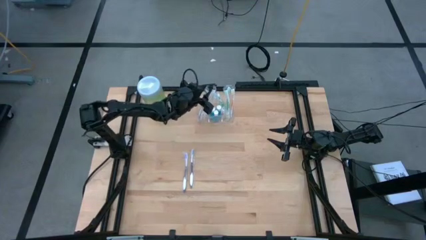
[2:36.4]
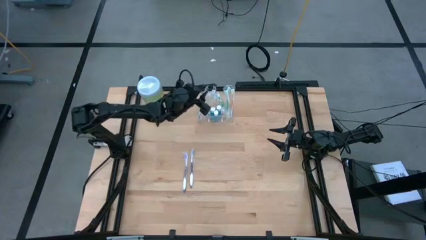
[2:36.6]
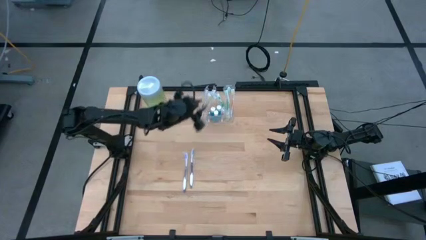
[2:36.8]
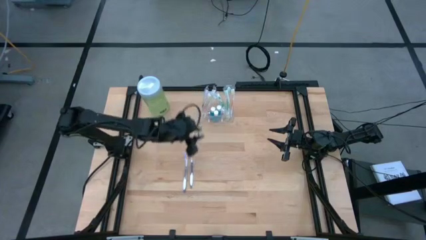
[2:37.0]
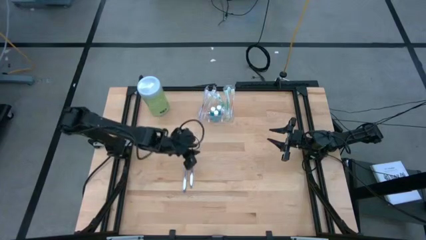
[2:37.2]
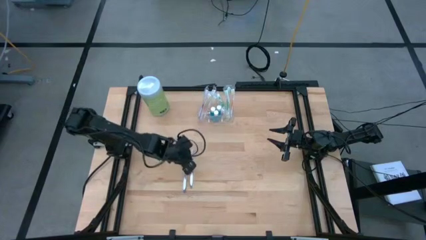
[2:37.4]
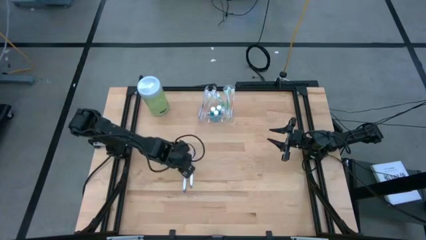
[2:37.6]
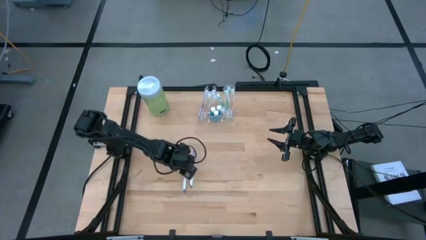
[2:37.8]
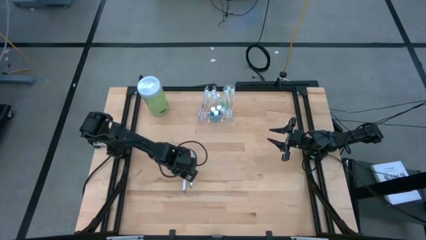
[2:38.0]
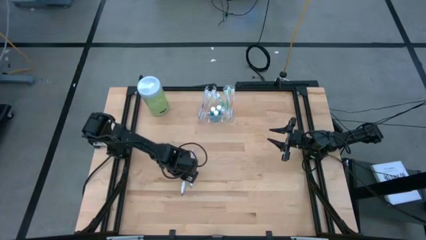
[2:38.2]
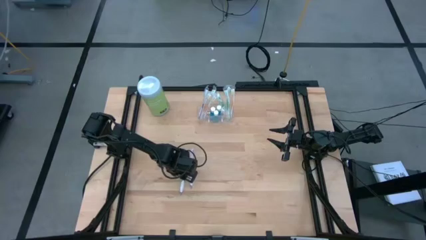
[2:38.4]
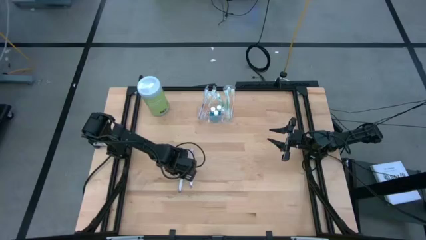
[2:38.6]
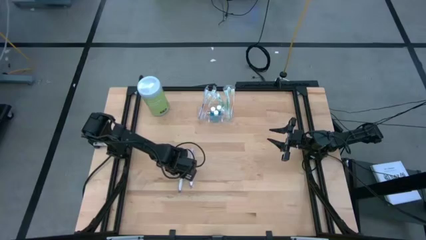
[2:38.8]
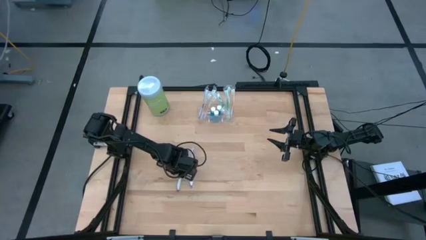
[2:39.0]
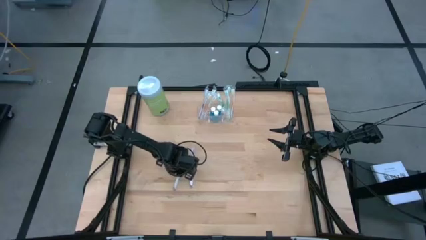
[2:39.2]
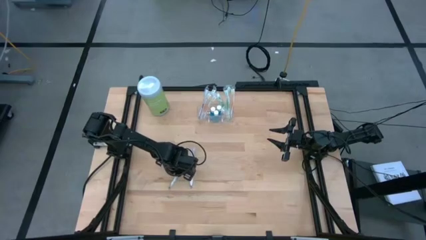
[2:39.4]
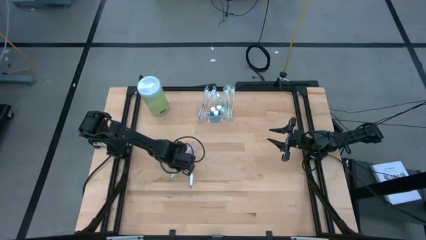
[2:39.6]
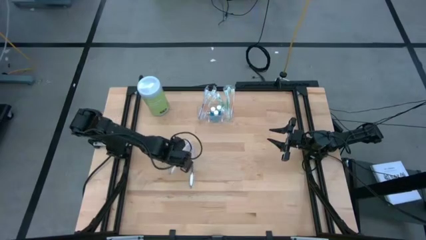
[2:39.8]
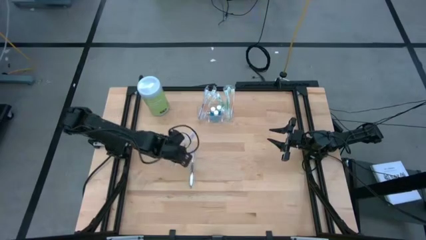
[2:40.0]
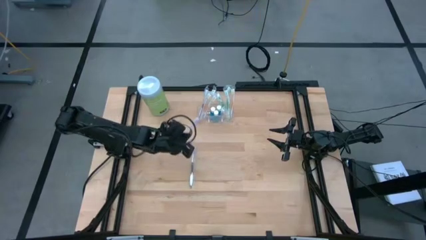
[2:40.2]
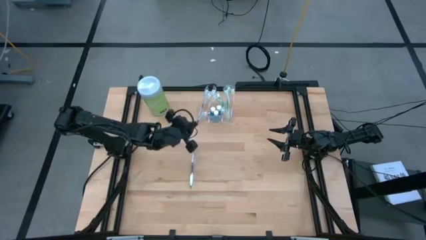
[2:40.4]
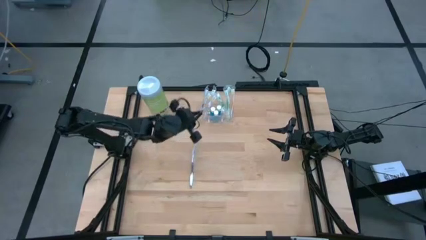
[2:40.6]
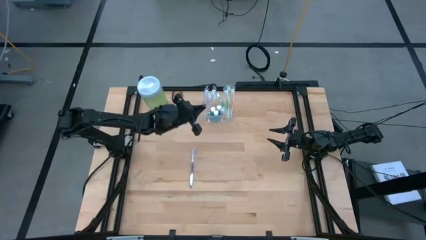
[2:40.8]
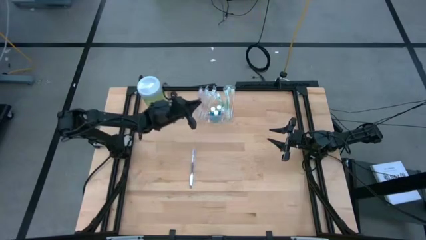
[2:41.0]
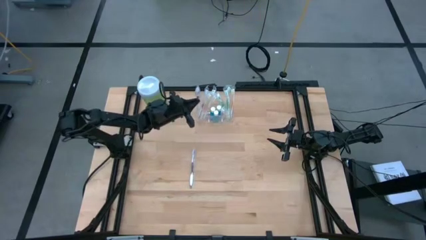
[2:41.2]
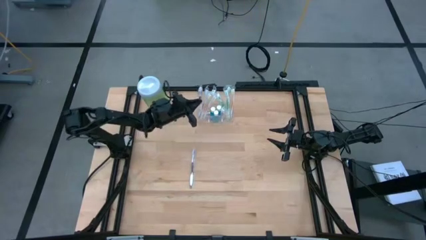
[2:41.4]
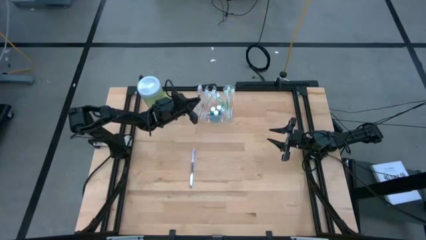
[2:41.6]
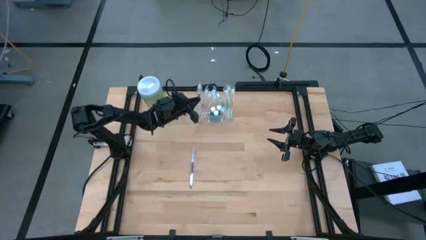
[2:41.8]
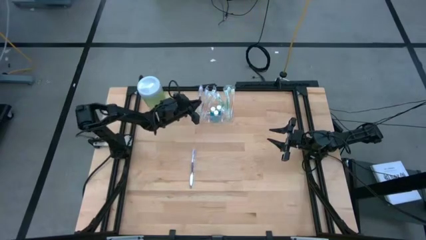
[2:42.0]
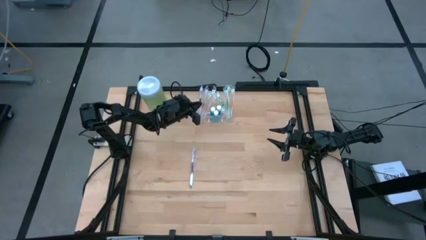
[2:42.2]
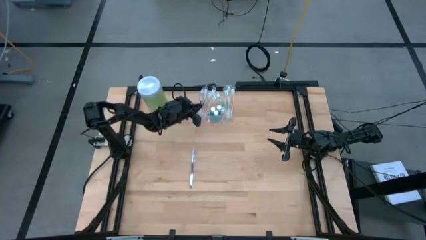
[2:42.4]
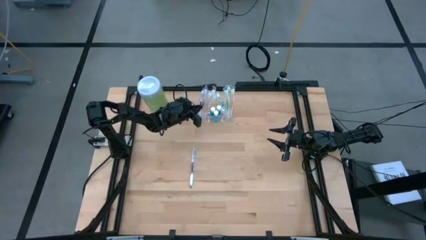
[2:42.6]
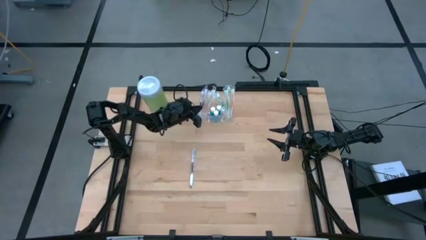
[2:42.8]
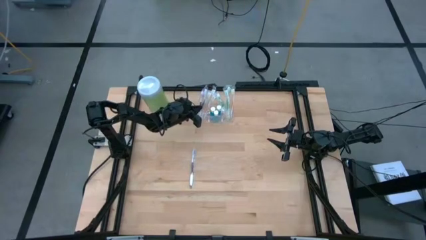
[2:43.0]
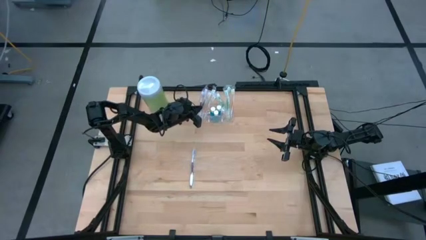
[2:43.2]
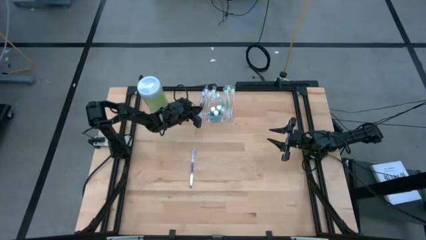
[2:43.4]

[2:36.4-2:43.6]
Task: Pick & Place toothbrushing station
Put the purple toothbrush into the transparent organizer

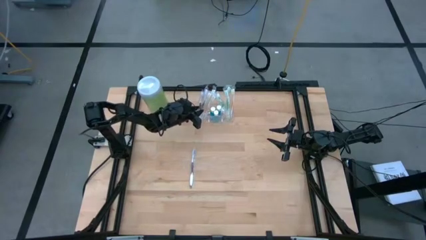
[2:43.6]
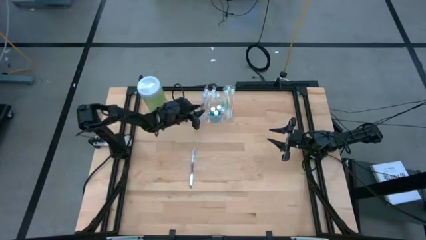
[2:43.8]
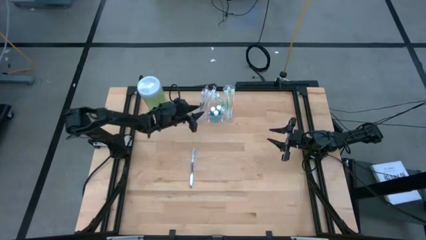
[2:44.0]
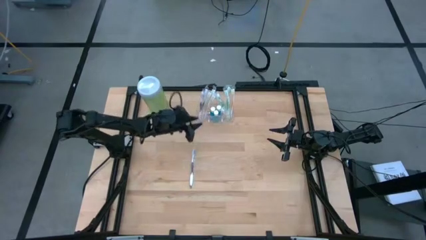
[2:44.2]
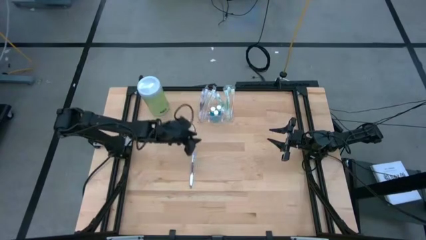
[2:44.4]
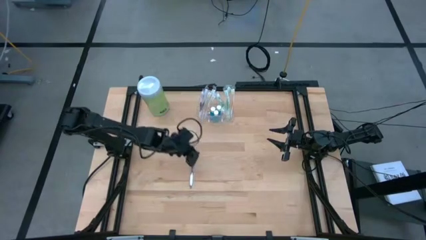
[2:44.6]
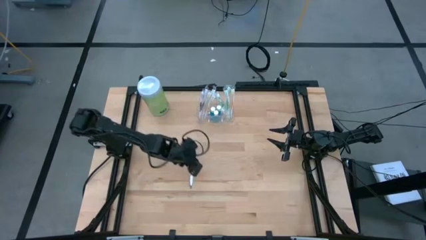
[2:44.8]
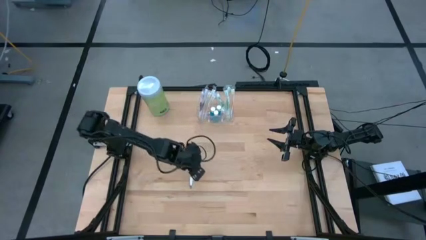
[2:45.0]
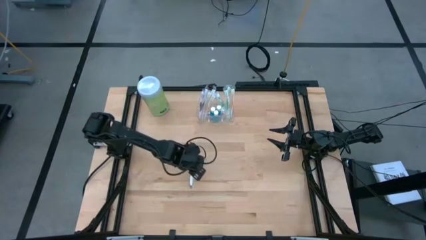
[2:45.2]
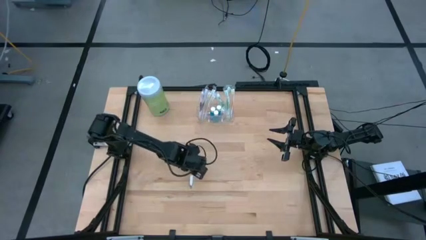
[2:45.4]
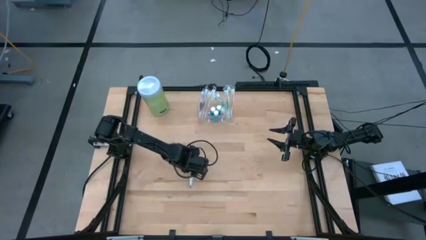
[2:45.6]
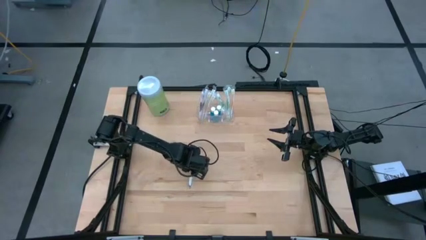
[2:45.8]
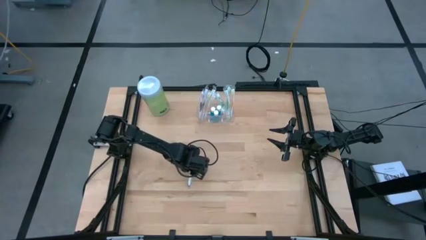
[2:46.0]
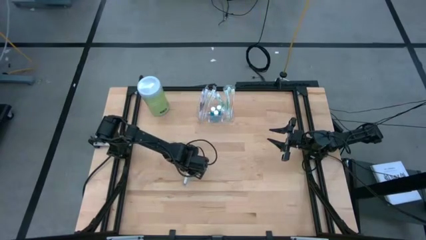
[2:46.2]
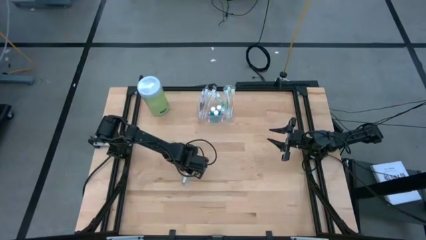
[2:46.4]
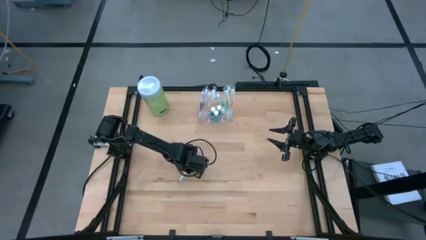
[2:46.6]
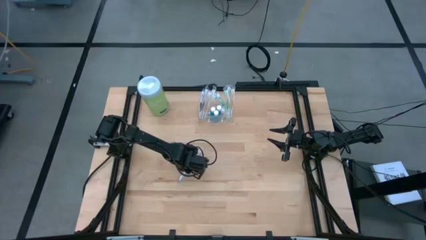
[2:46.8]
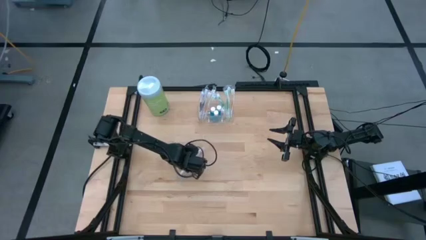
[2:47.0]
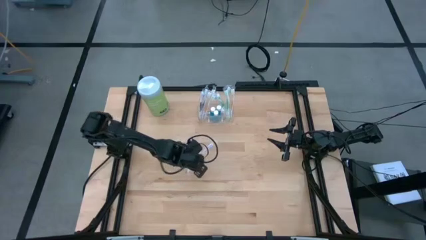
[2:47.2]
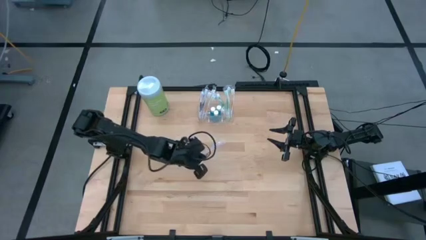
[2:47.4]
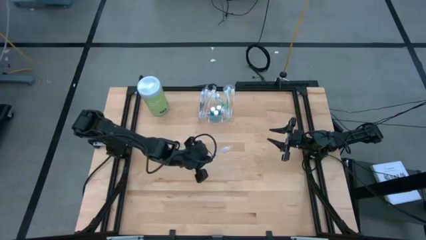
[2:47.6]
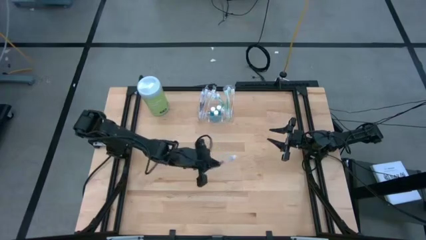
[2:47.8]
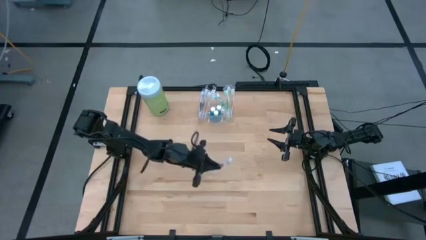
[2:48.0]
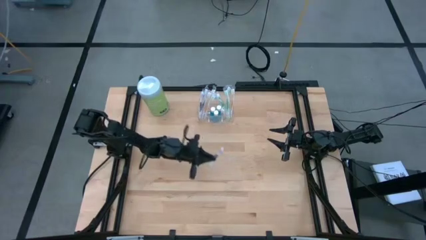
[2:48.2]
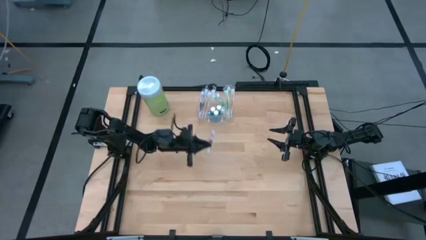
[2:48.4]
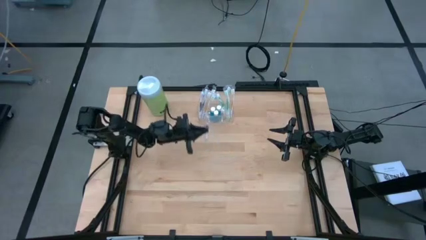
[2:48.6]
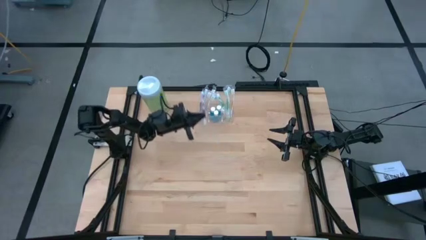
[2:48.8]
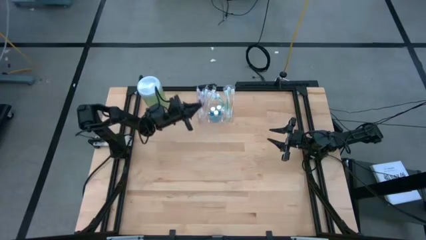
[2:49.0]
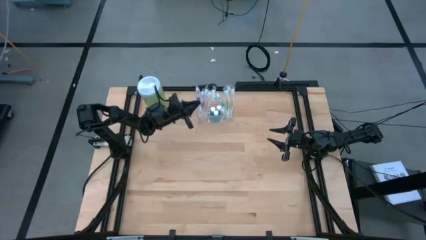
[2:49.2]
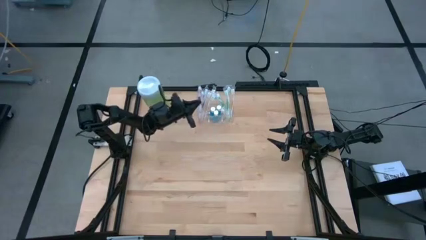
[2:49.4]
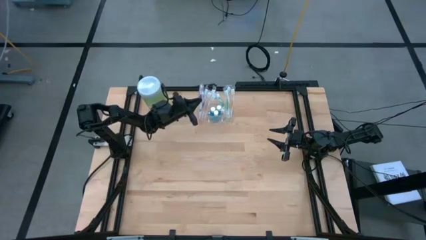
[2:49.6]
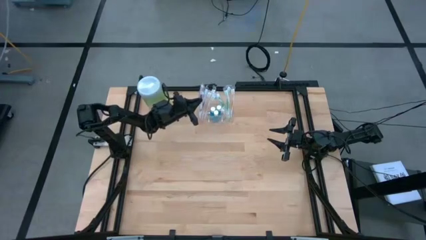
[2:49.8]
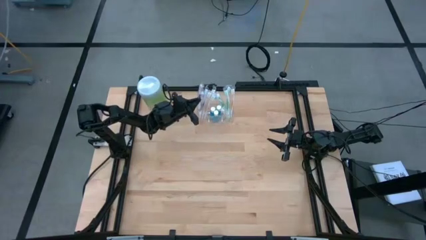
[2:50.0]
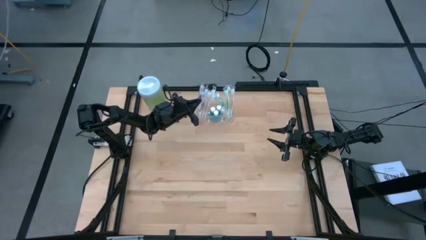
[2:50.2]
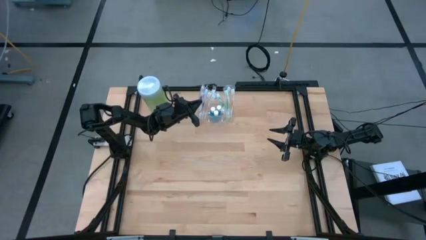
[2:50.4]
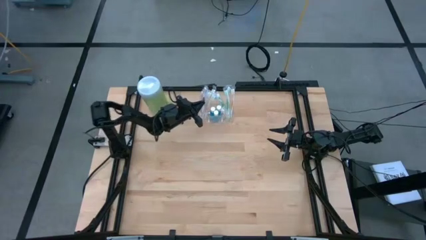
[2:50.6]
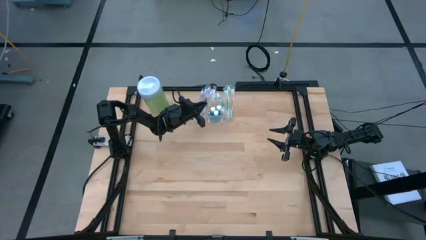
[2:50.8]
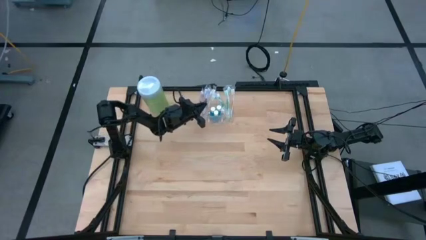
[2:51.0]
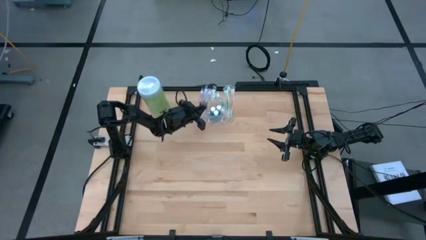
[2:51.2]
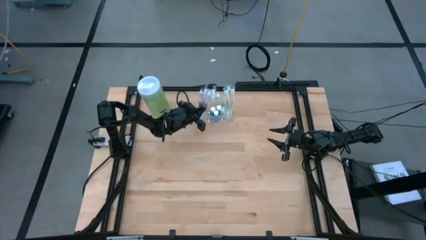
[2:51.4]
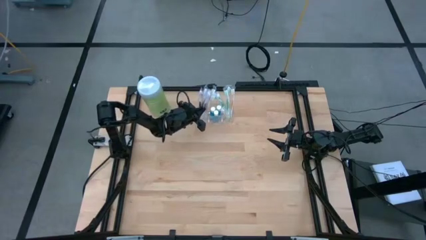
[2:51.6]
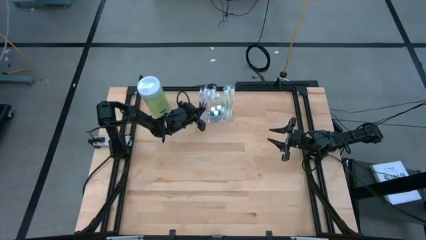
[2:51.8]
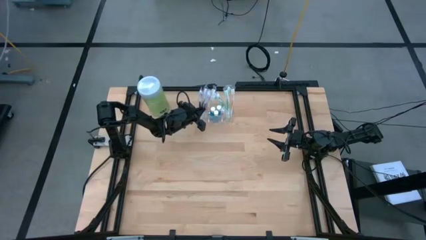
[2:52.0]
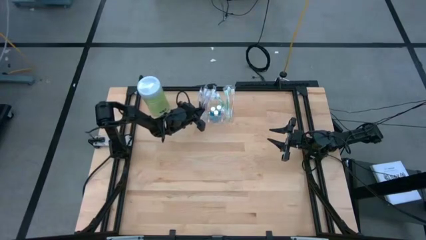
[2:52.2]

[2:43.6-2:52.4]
Put the purple toothbrush into the transparent organizer

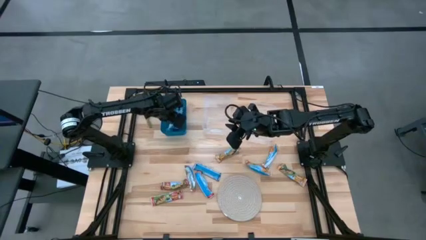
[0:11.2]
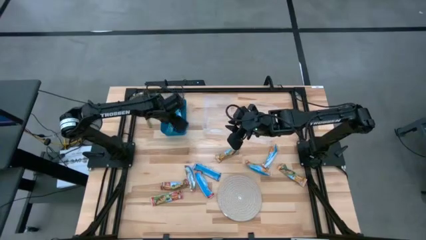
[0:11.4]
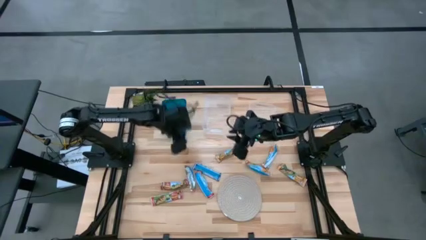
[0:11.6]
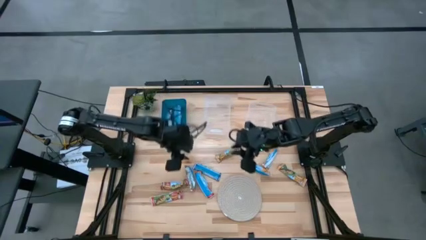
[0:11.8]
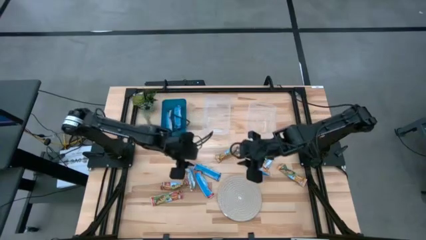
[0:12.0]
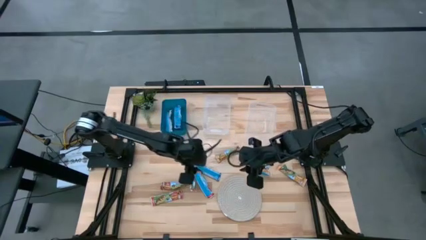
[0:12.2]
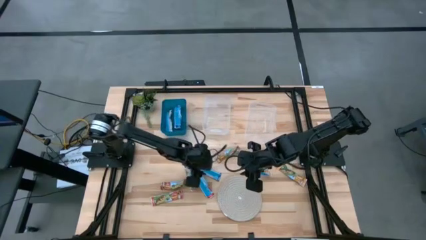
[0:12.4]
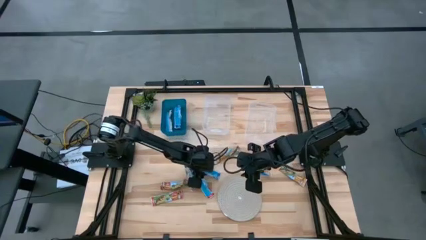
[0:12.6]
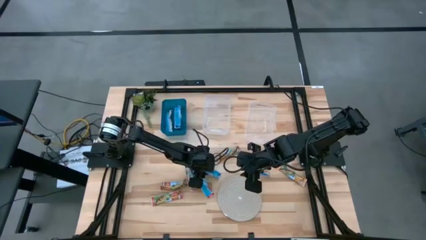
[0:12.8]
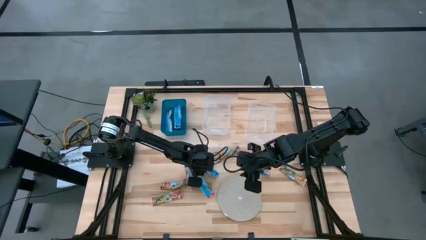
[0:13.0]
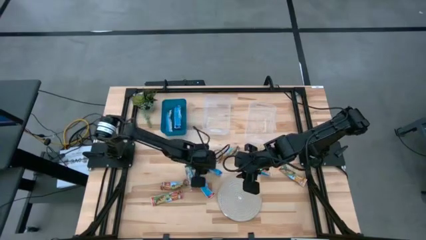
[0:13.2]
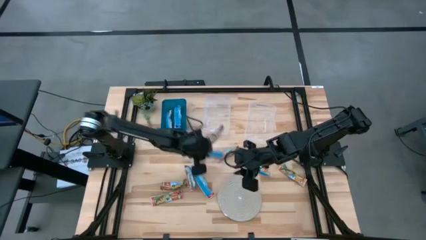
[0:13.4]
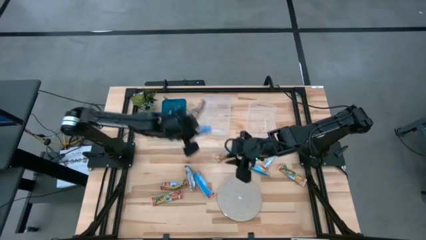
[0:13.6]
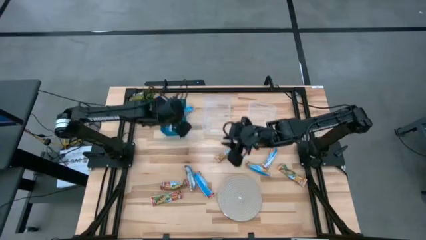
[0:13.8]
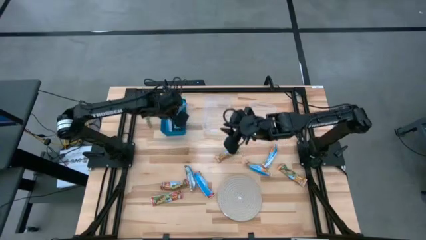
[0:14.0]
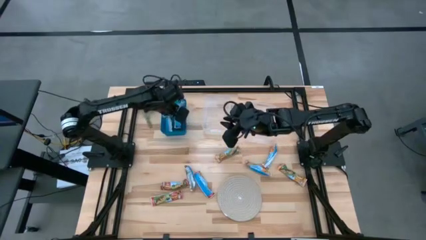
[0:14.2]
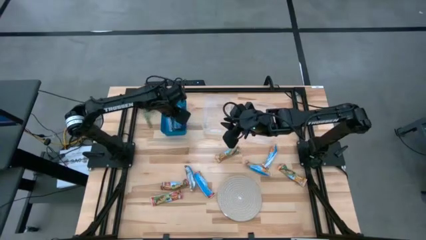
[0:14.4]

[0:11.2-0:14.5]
Task: Pick and place Granola Bars by type
Put the blue granola bar into the blue bin
